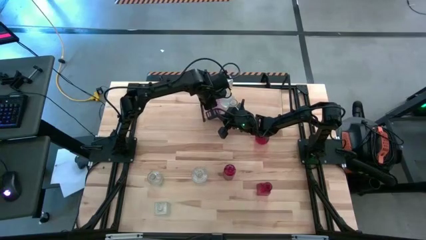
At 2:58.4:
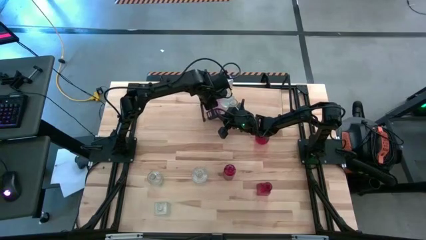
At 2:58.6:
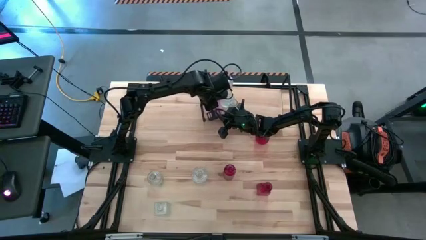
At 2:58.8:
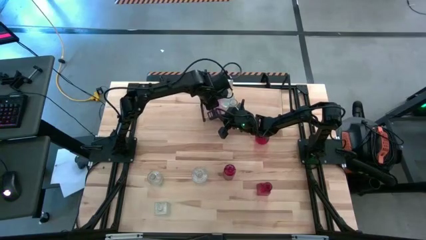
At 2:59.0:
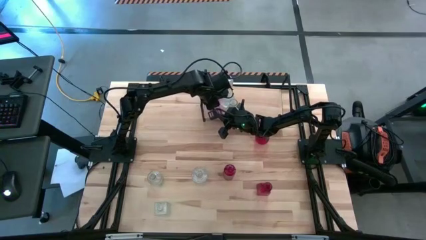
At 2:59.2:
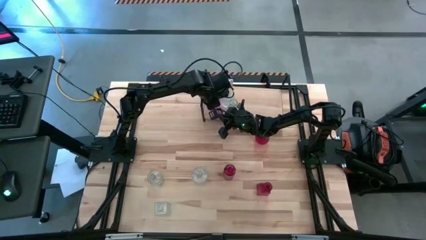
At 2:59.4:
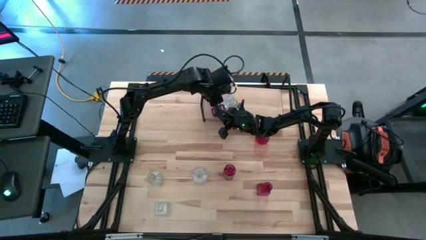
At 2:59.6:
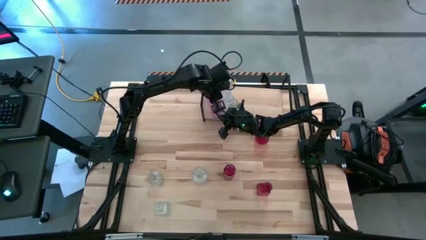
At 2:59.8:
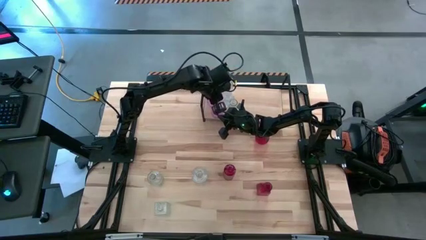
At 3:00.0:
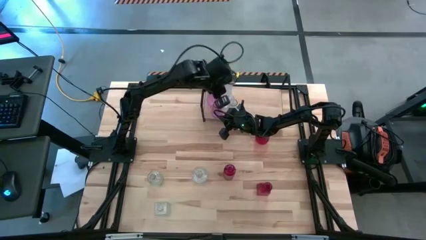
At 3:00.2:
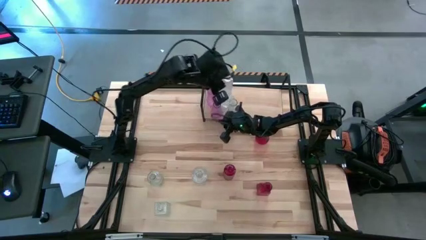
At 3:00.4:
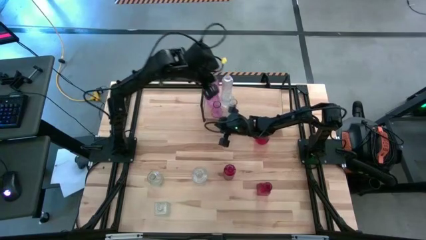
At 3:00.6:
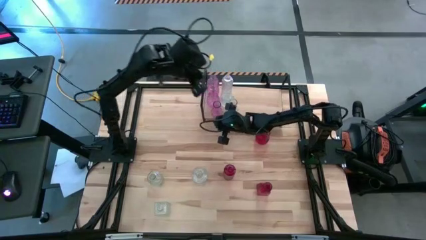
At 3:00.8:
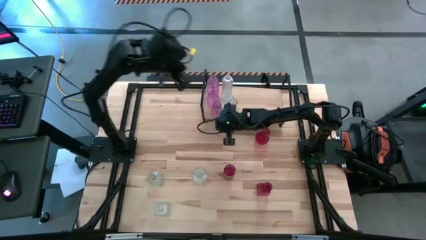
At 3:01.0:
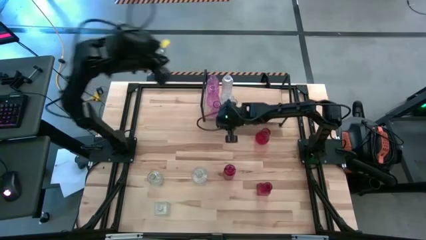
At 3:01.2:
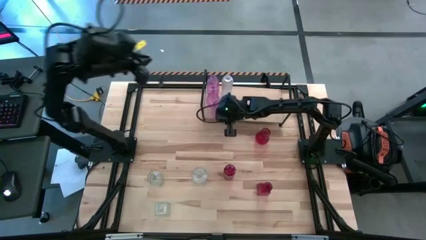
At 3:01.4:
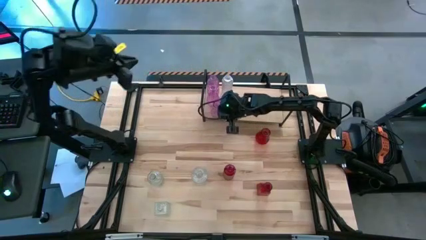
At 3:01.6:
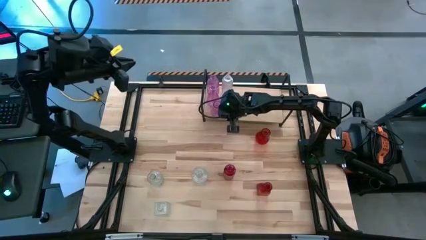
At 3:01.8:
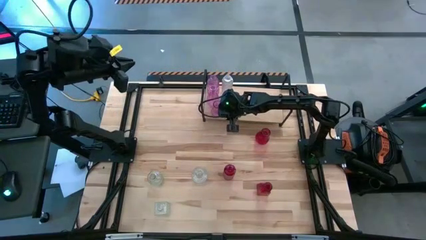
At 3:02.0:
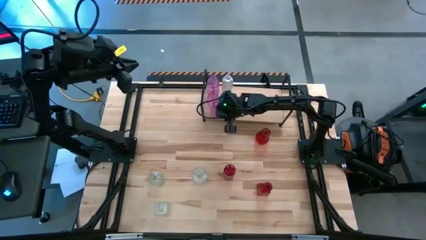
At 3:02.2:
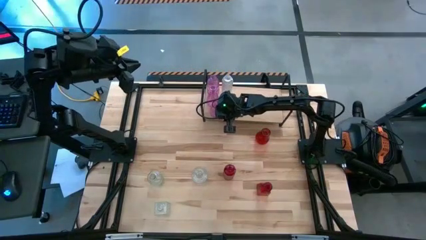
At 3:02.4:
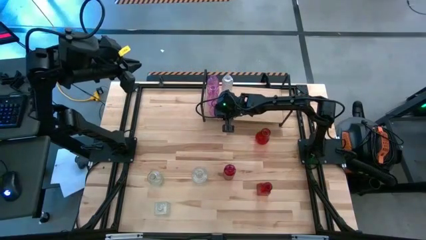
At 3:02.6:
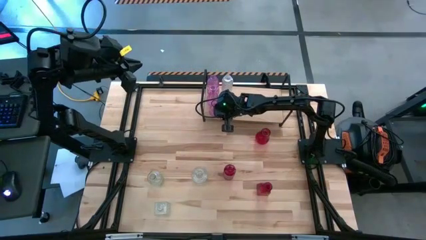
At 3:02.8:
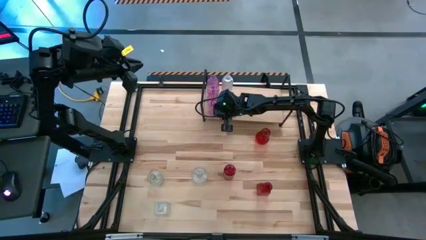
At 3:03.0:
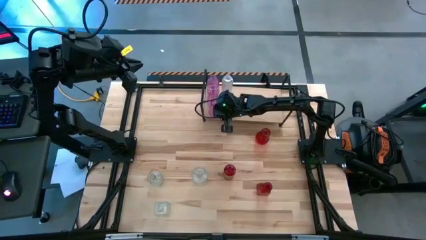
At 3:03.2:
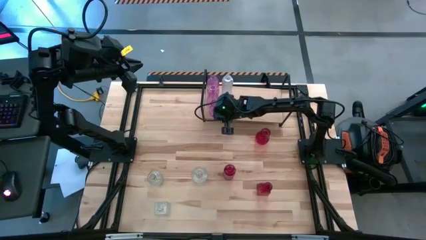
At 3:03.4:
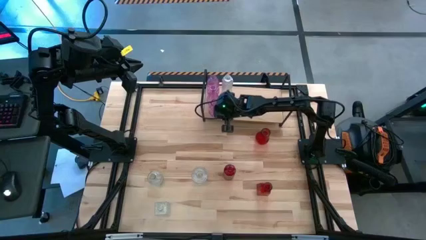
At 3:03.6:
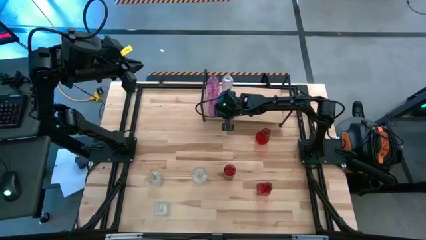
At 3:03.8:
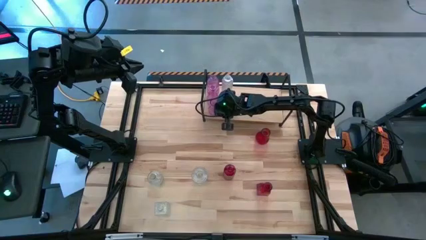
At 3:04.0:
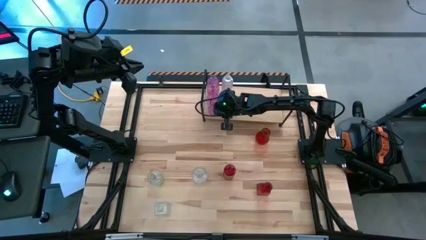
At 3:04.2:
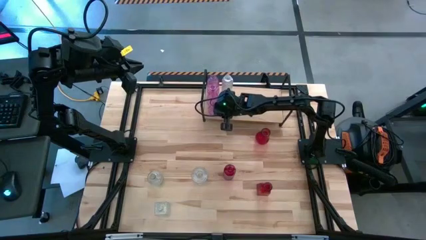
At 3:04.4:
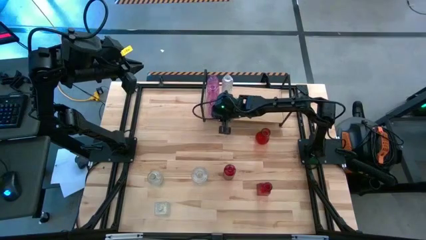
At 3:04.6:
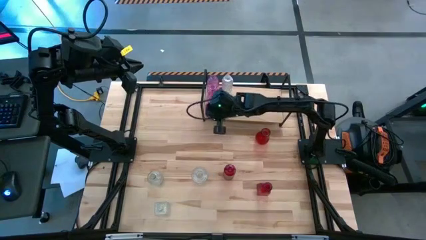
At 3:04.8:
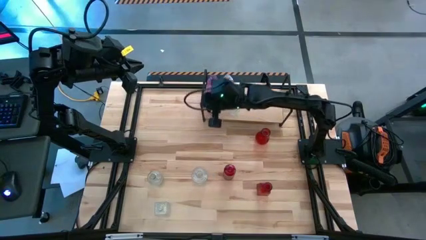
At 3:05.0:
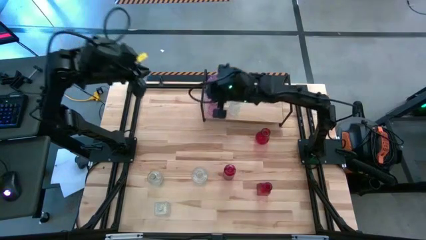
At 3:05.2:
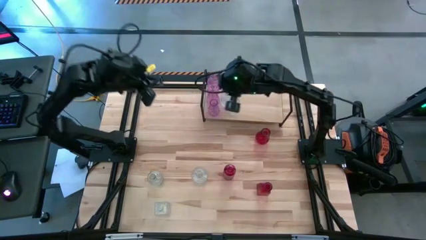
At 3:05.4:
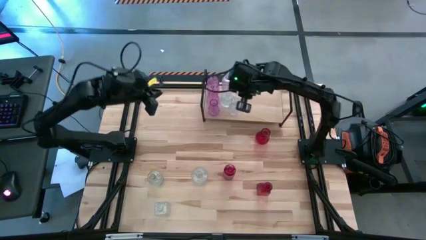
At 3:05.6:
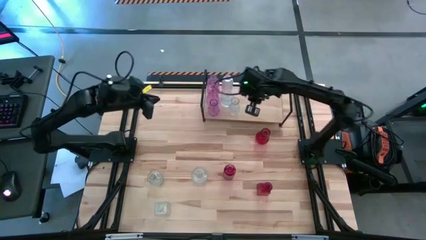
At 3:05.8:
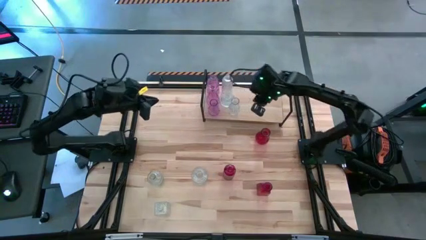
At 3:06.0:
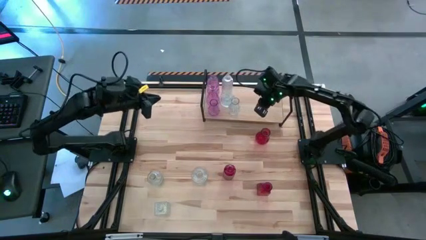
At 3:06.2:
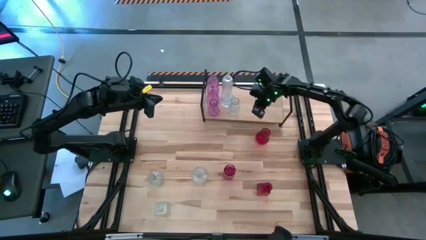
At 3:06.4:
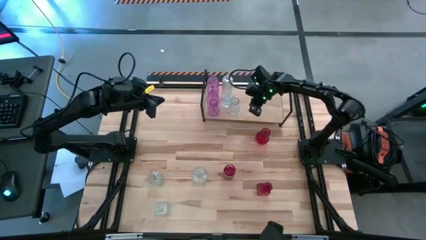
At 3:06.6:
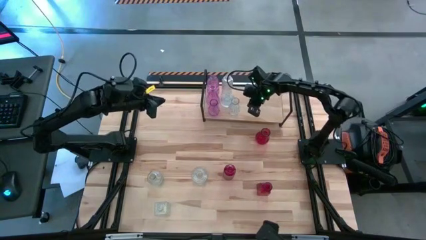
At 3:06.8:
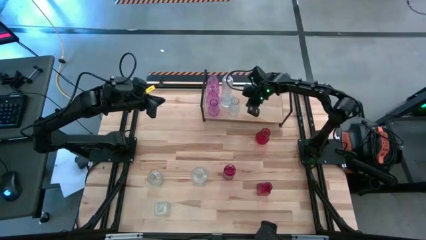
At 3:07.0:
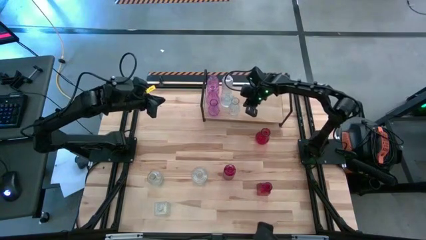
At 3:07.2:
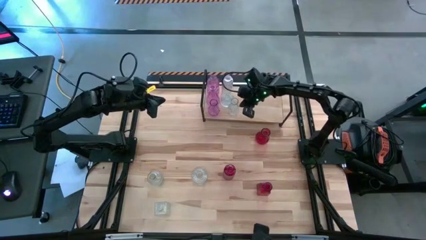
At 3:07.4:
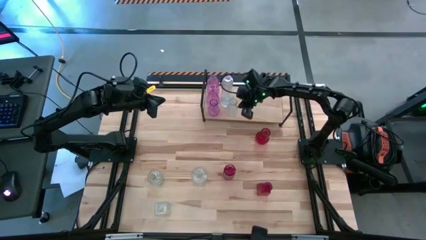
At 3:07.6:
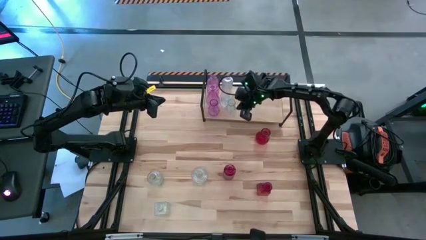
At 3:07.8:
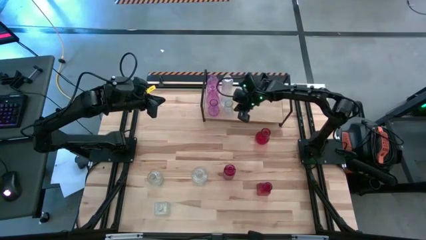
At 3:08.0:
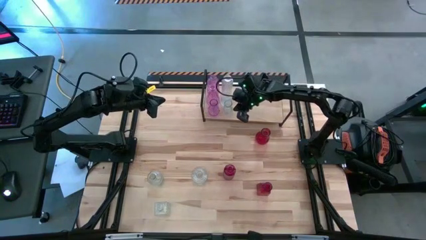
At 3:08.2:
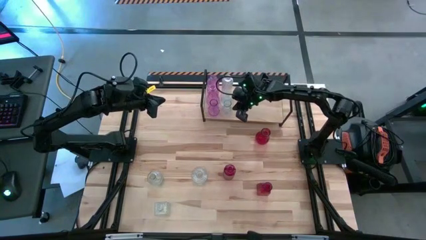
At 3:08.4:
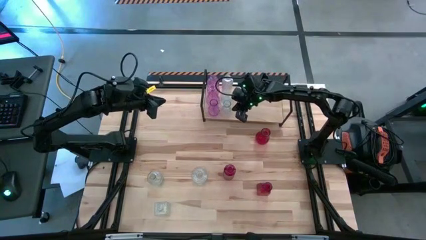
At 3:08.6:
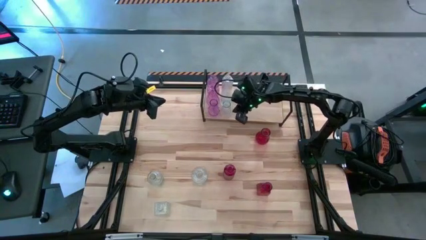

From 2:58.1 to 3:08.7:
Task: sort vases onto shelf
Align the violet vase with the other violet vase on the shelf

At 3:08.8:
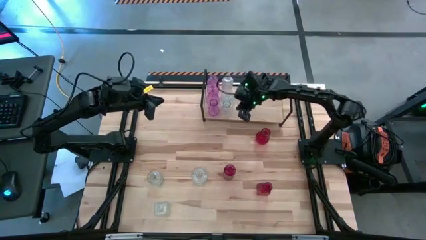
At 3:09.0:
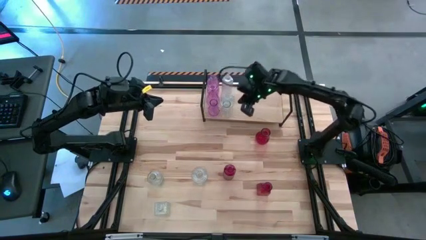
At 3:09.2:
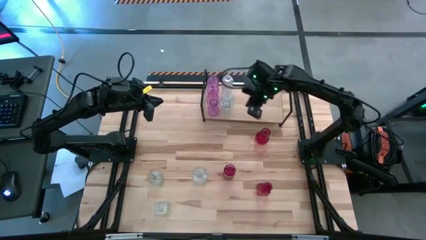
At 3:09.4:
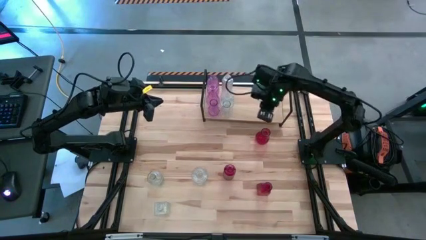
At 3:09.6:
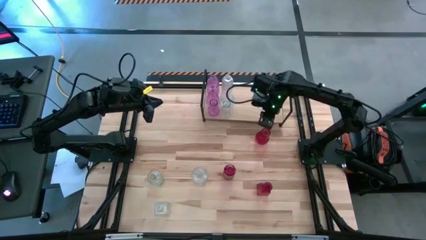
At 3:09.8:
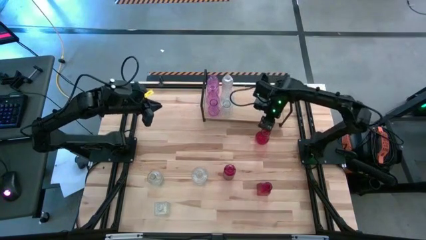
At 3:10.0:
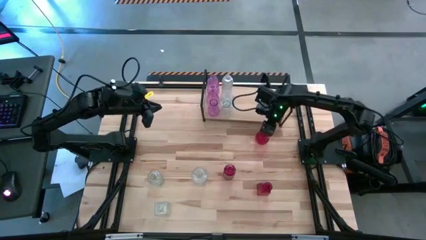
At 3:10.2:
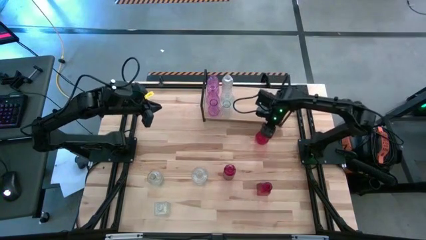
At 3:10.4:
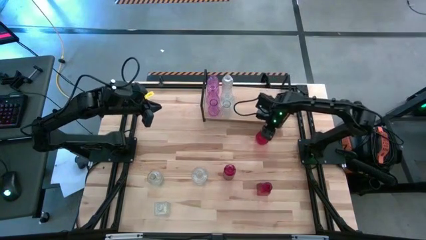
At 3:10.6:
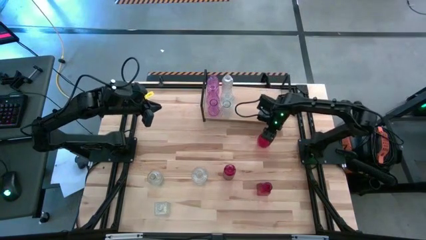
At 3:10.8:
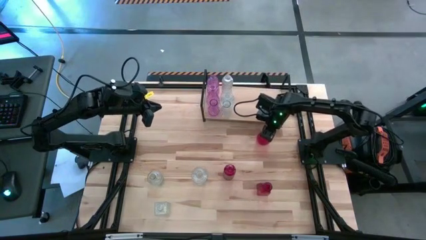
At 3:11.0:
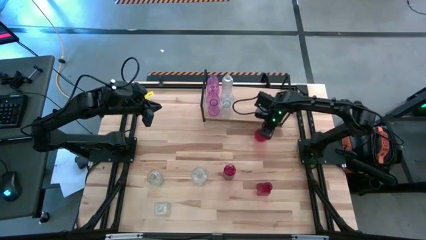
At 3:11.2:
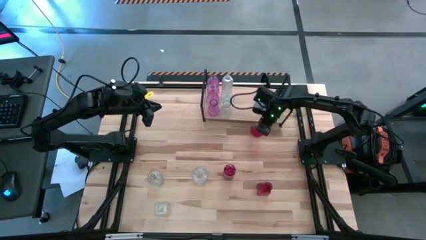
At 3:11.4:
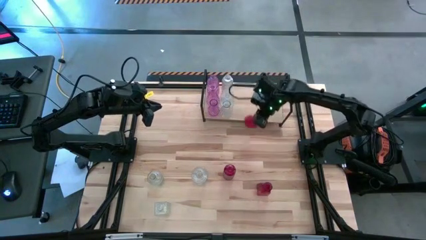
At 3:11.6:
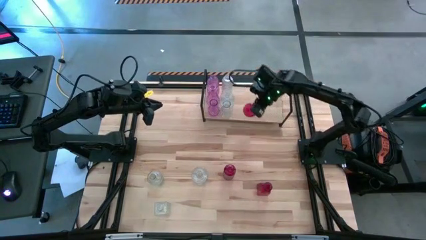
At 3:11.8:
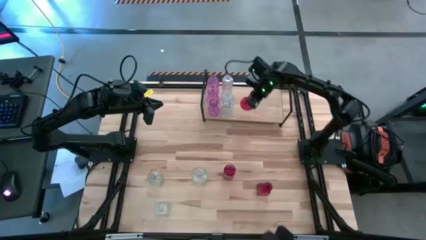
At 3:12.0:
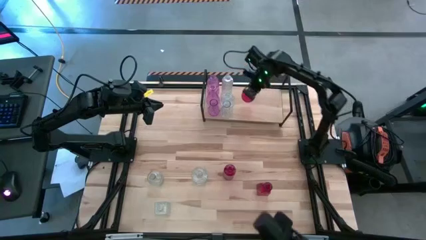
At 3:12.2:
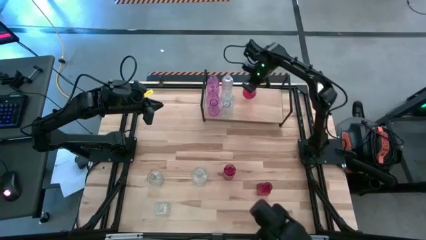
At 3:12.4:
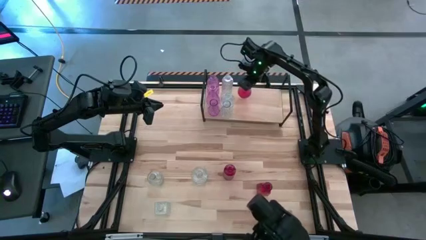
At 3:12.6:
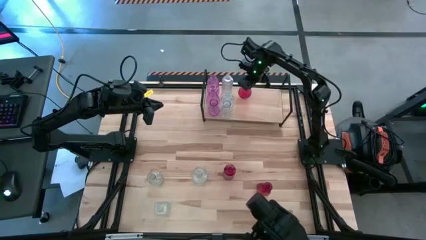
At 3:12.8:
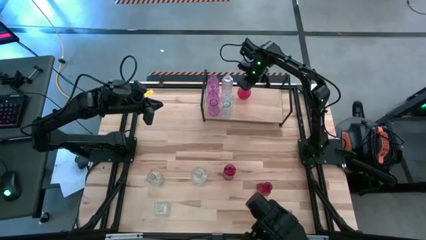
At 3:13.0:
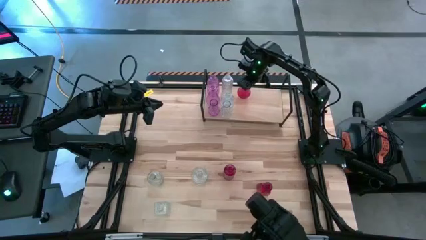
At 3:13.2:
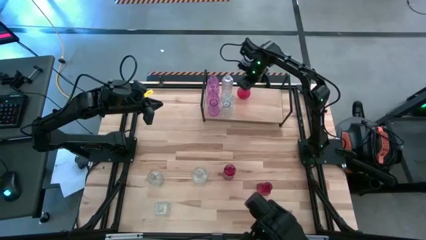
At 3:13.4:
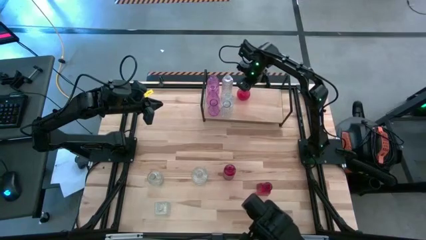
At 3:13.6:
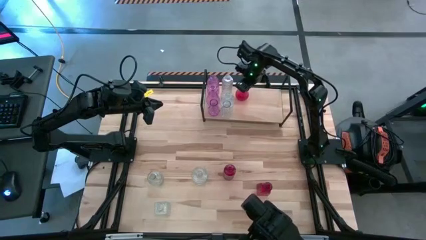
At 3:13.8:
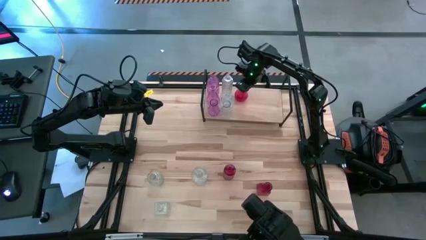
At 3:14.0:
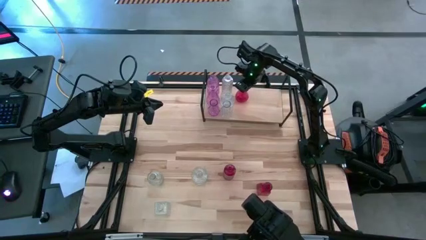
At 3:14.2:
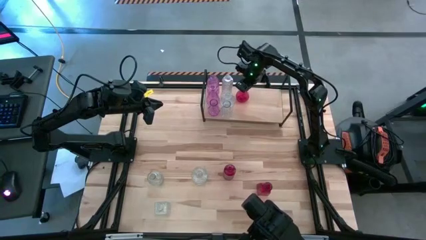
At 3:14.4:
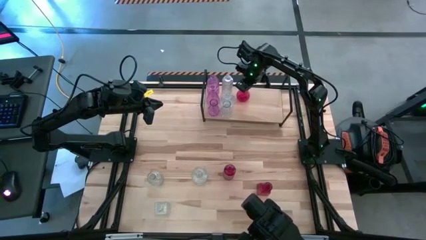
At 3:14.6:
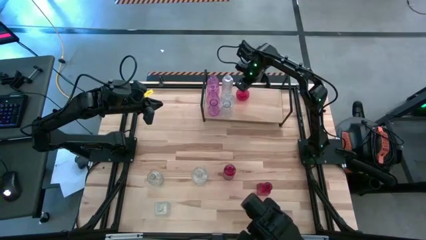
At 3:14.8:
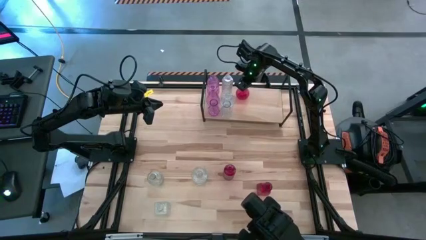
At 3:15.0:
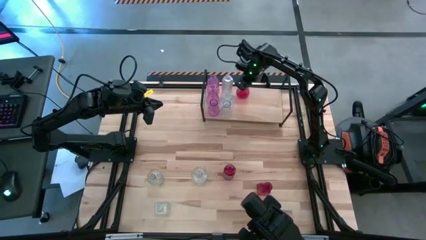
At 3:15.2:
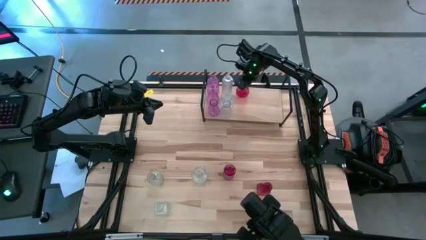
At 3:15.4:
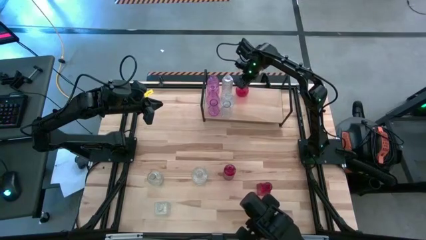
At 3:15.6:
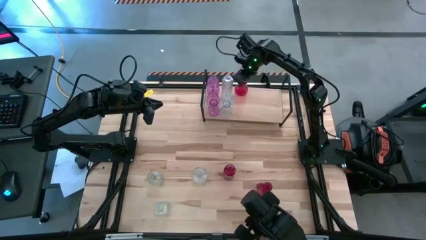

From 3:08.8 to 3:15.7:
Put the red vase on the shelf
